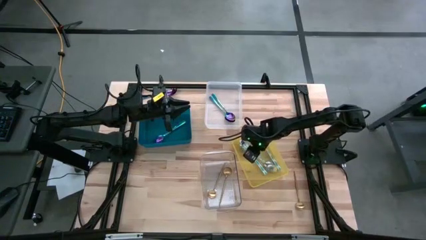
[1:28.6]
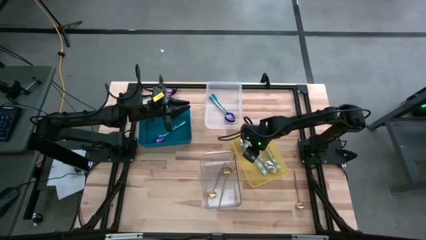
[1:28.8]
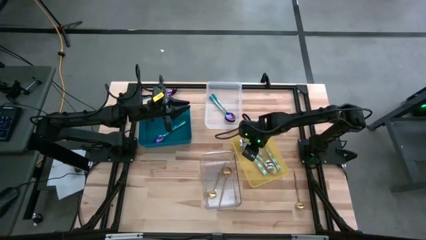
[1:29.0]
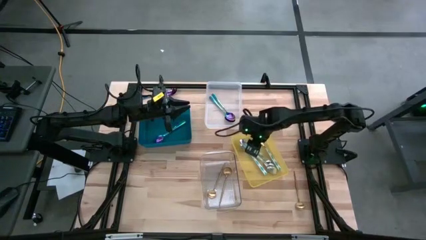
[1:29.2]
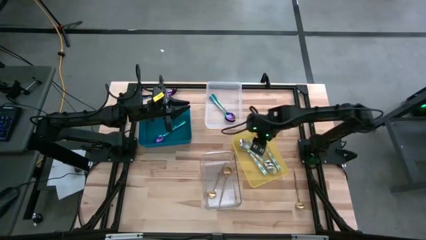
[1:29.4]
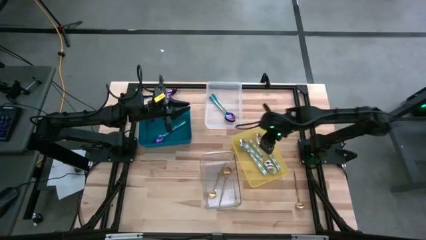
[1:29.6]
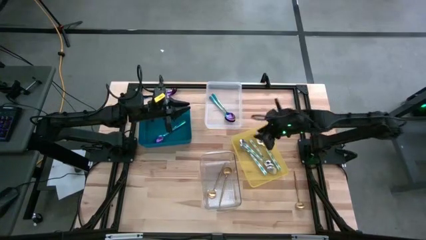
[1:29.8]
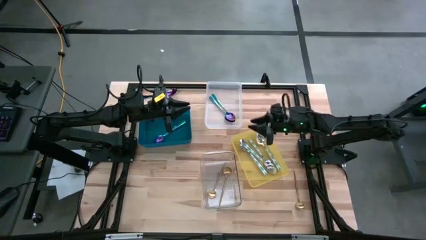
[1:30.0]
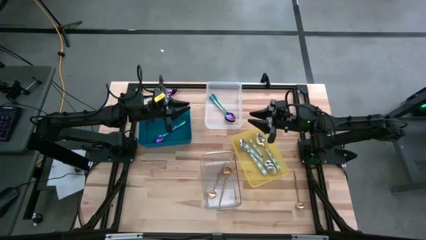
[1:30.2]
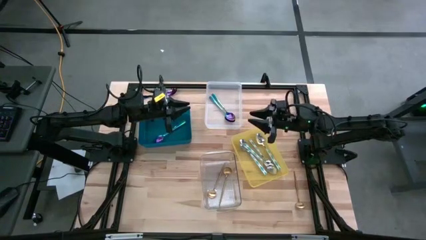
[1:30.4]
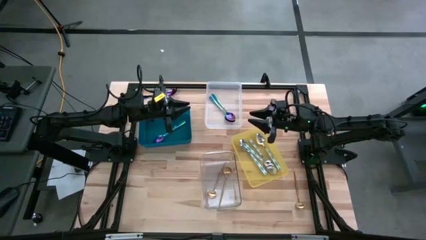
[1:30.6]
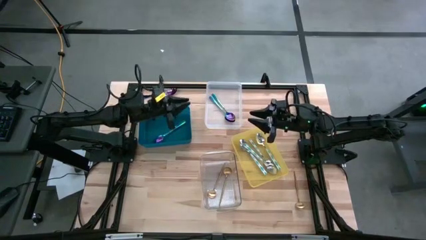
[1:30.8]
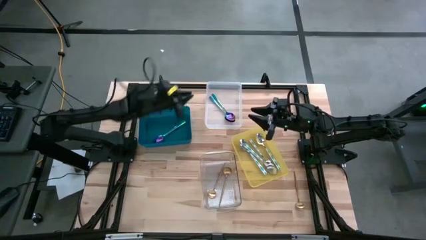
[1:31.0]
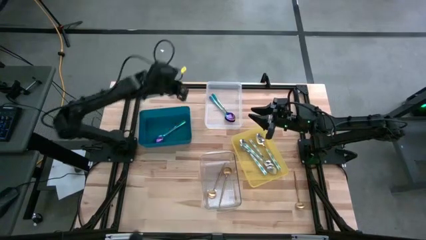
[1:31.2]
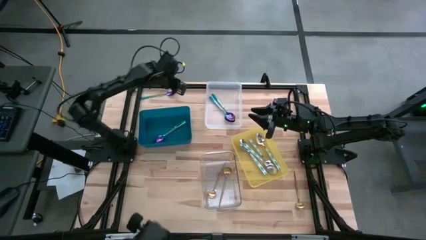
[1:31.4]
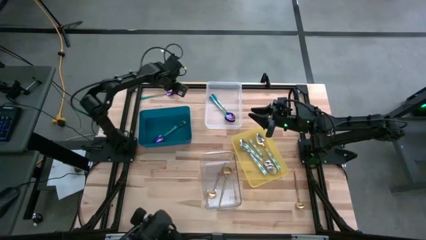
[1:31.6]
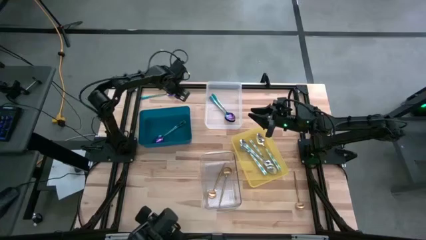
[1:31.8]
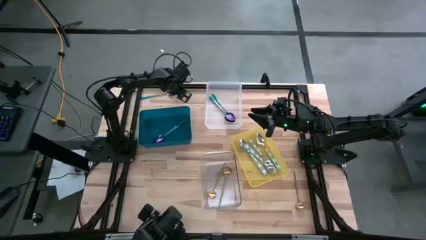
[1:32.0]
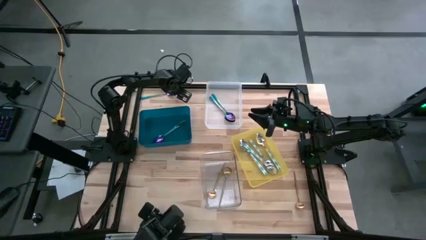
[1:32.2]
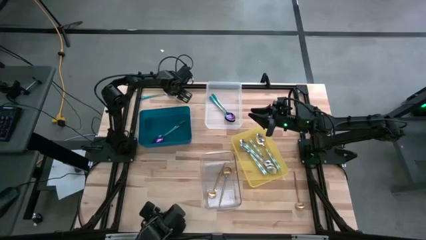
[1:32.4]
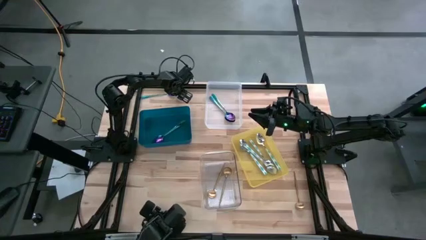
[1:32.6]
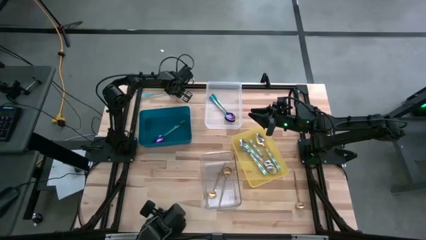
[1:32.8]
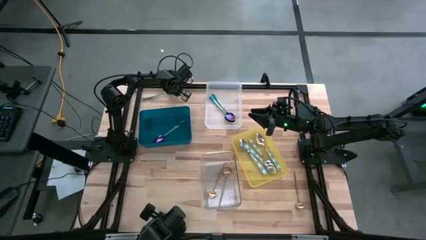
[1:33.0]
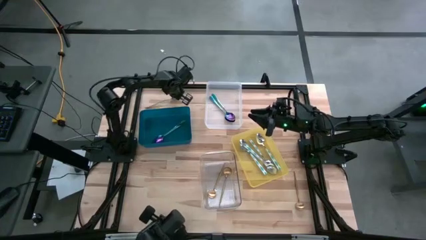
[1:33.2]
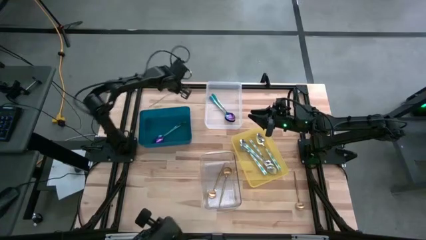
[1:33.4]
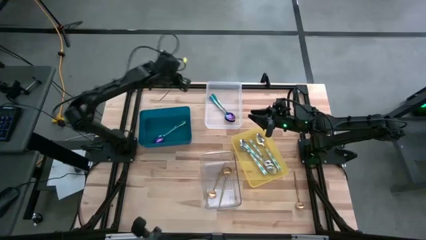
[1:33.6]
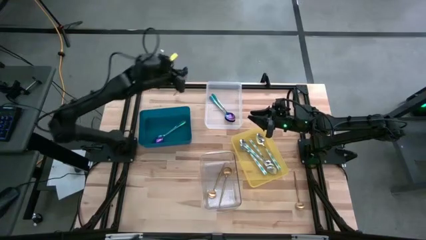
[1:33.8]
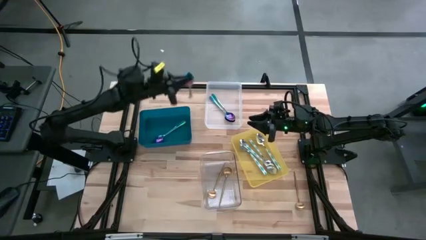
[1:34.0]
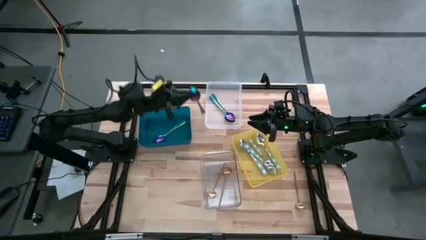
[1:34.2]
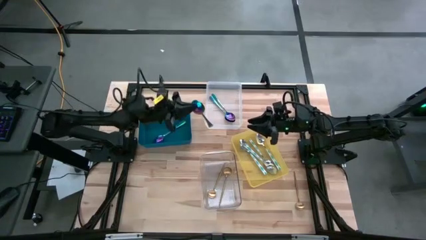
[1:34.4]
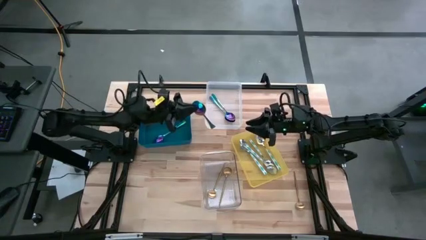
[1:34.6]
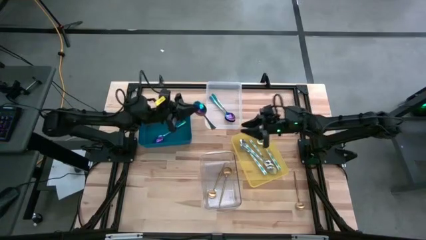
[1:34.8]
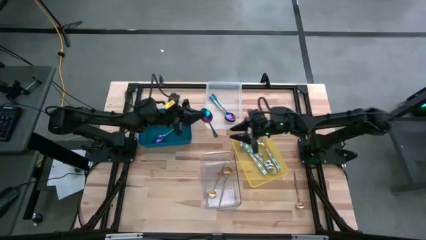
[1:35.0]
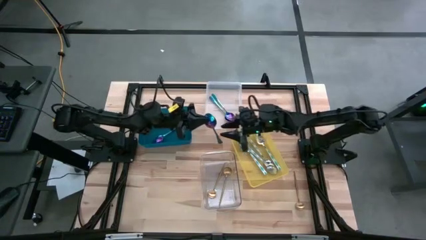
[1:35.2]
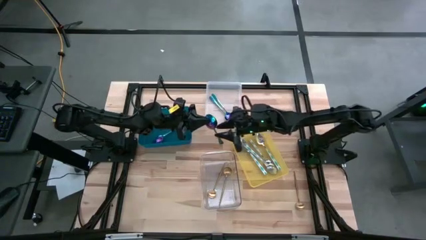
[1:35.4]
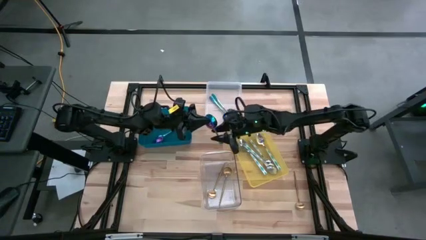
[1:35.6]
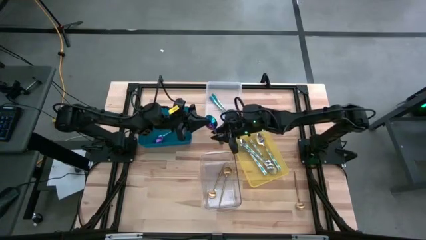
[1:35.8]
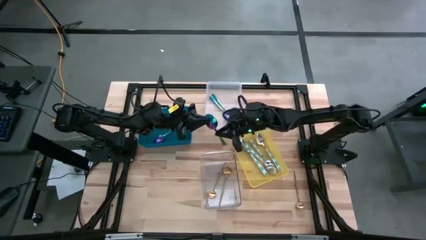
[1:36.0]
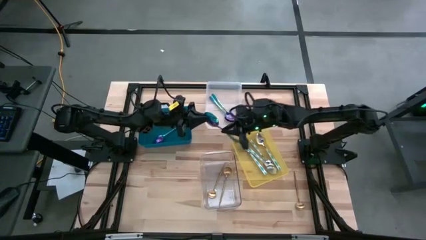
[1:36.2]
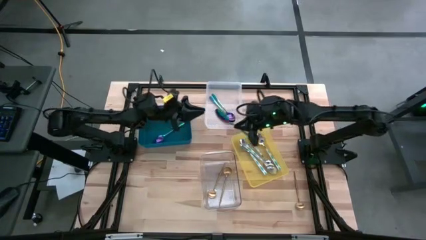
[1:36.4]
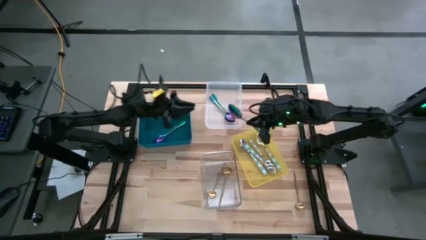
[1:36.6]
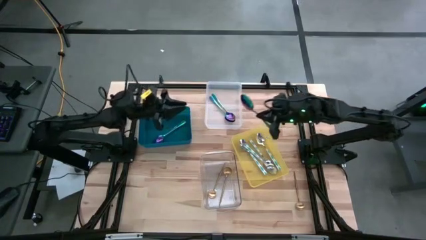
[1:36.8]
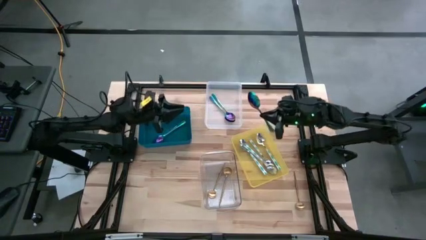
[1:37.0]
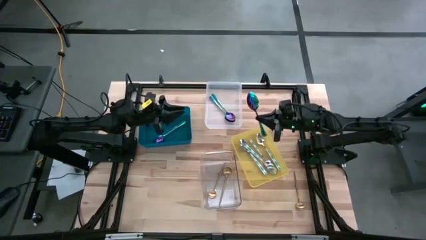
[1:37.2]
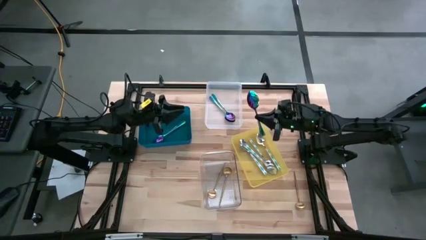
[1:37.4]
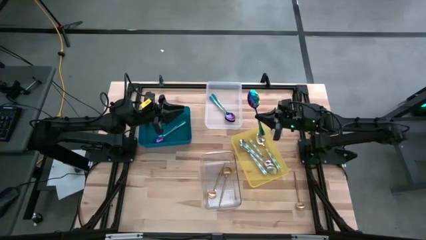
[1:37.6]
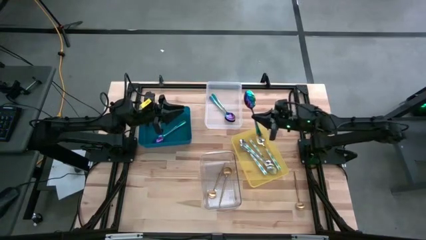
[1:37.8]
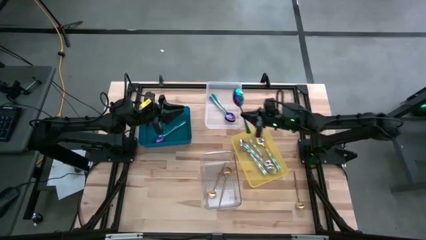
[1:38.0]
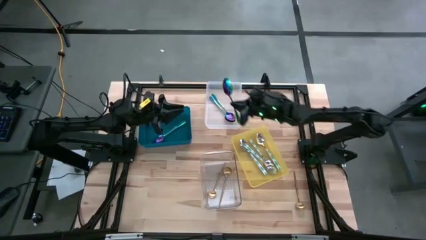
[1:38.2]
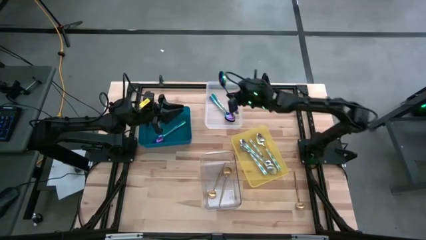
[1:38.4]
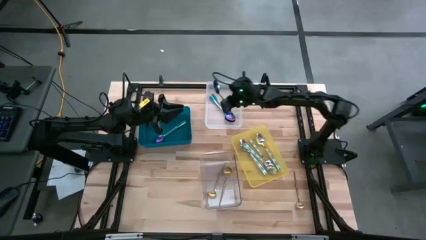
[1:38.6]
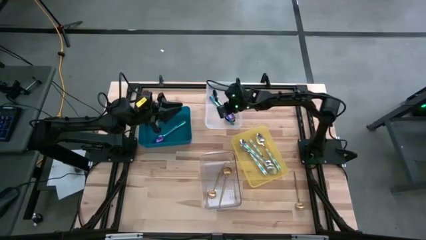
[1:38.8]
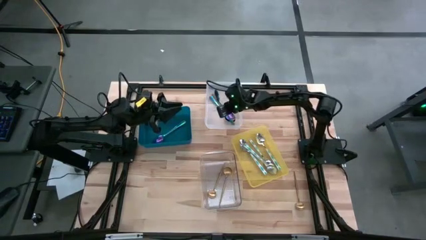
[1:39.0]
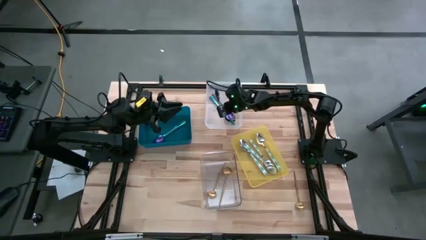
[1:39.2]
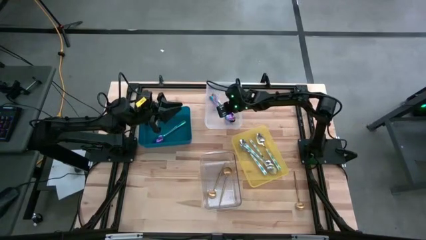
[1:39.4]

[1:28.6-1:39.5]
Task: Sort silverware by color (type)
Put the violet spoon into the white bin

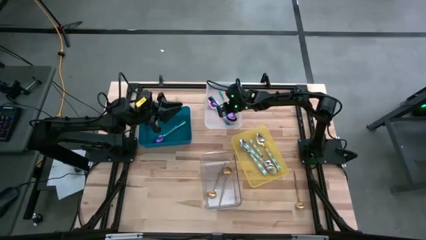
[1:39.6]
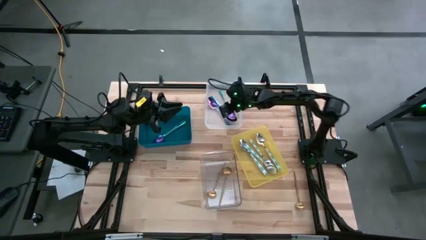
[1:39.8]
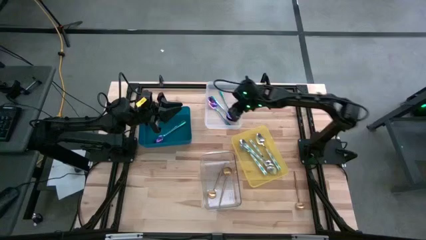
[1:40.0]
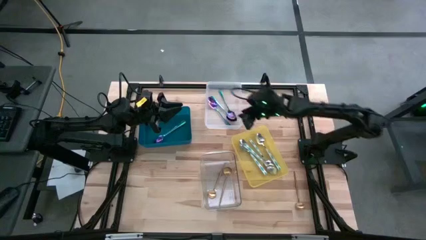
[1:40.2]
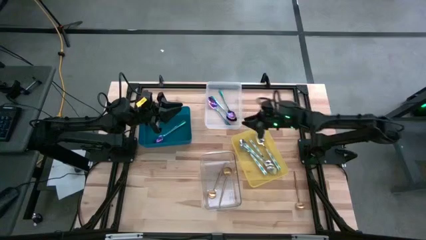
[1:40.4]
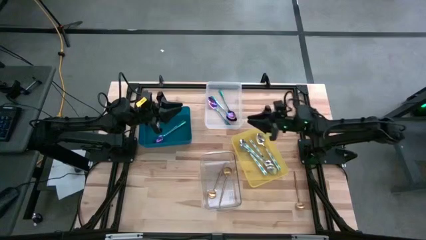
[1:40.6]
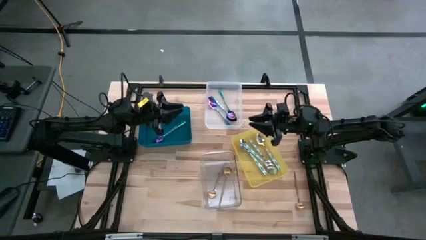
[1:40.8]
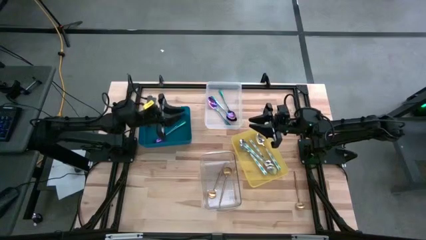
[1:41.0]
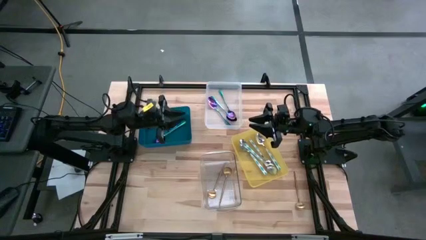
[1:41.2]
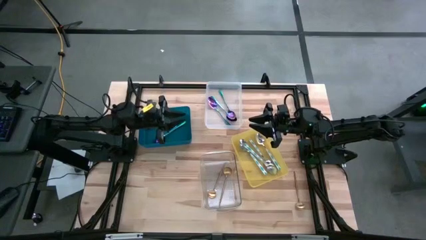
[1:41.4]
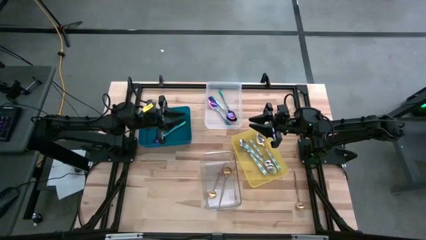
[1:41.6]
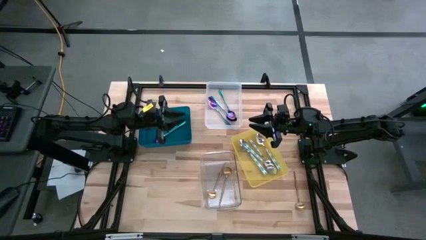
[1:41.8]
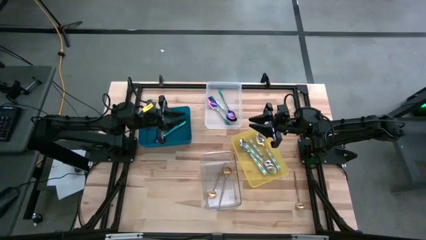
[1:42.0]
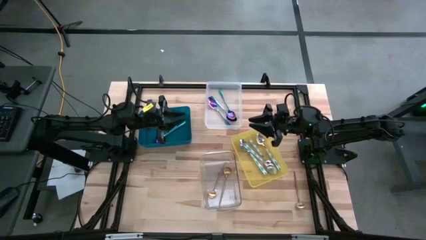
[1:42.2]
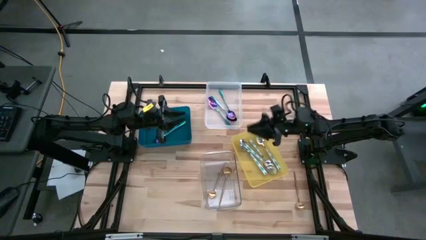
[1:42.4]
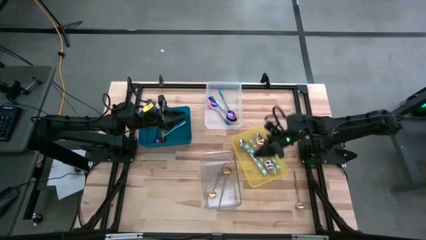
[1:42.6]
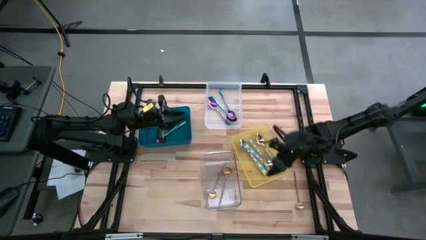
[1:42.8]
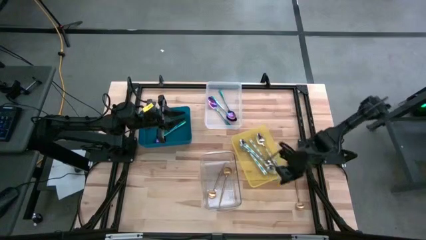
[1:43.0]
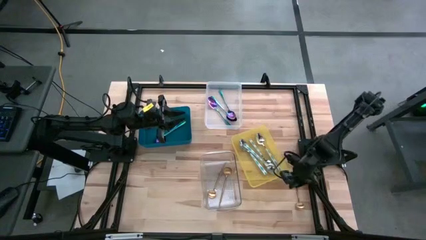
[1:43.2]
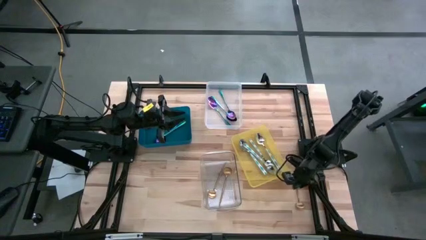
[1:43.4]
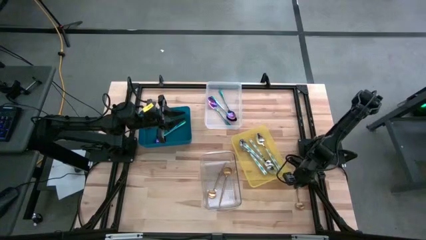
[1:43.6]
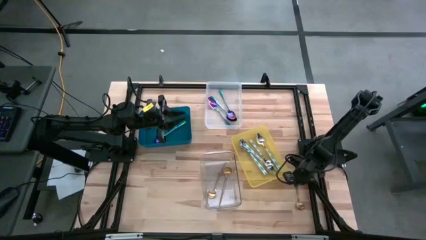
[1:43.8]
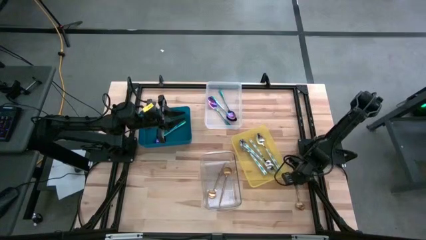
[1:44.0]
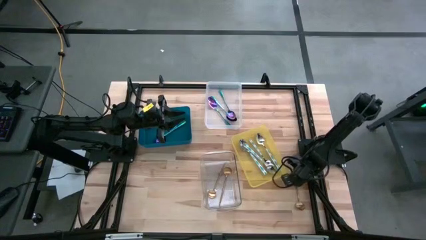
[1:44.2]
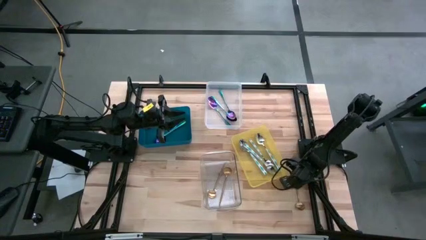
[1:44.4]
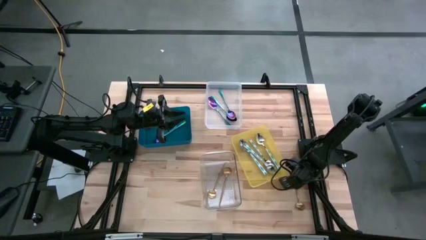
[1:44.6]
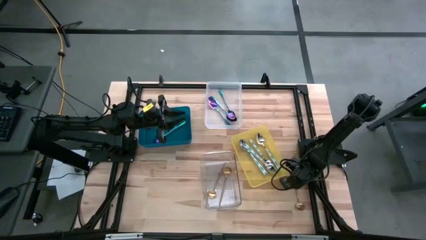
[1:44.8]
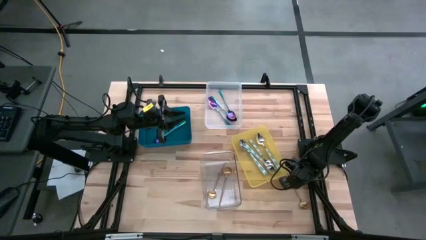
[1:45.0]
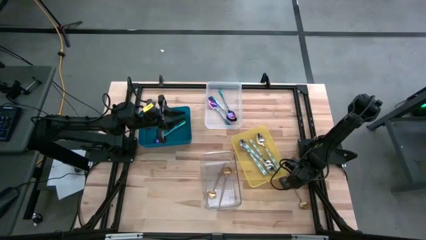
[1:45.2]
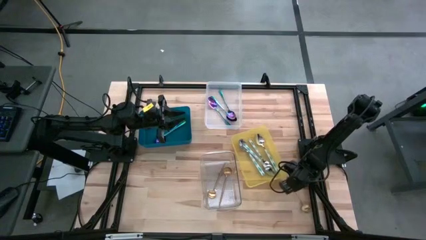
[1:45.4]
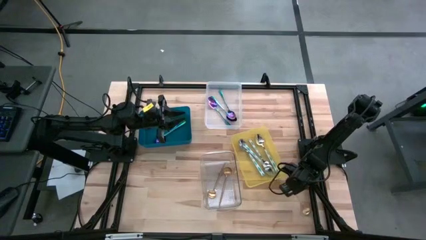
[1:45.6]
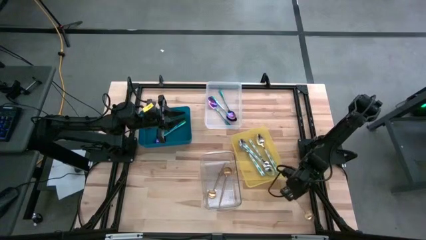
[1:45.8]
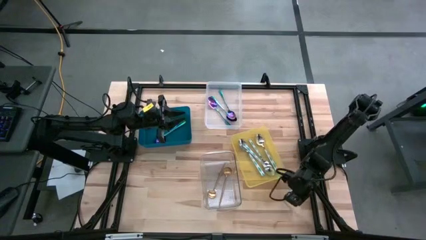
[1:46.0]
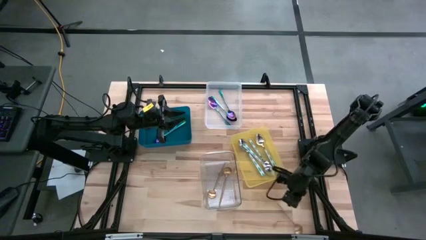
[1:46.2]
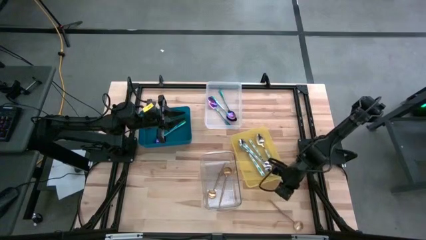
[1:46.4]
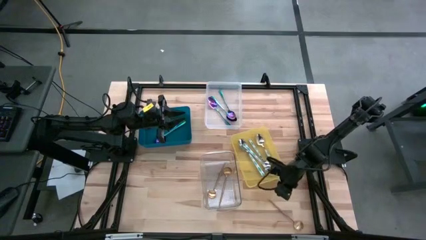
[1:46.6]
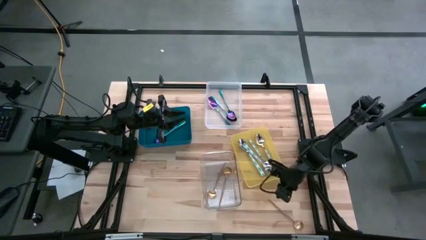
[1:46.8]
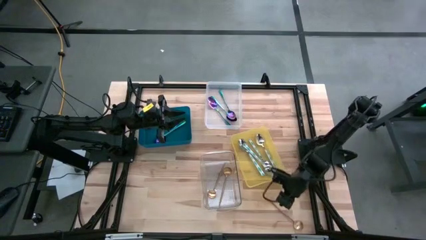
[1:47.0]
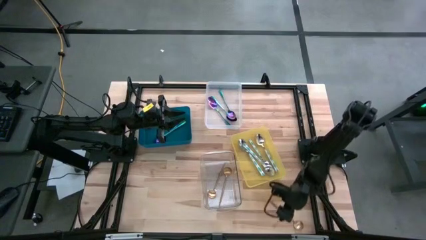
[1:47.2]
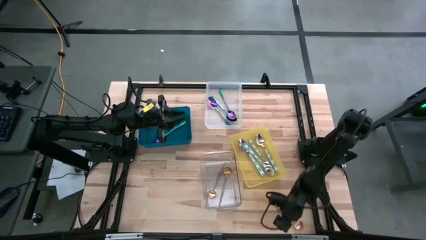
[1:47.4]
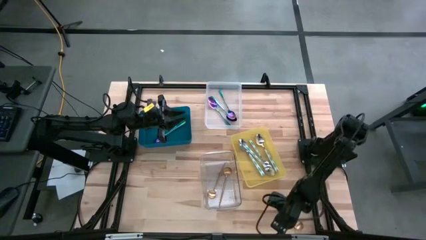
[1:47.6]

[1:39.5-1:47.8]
Put the gold spoon into the transparent bin
